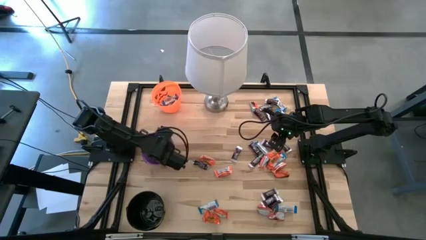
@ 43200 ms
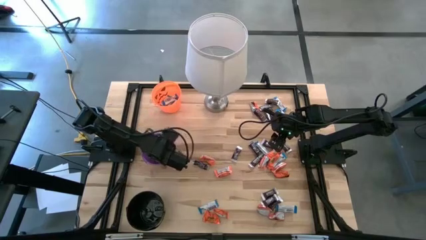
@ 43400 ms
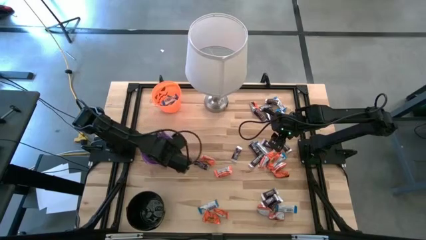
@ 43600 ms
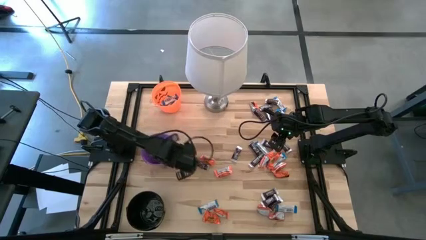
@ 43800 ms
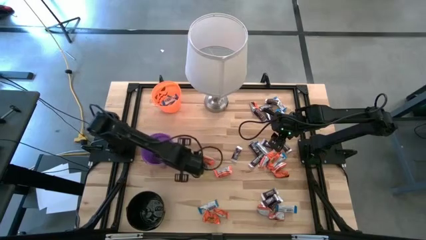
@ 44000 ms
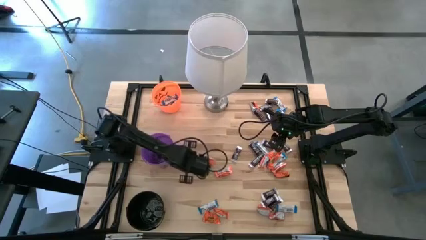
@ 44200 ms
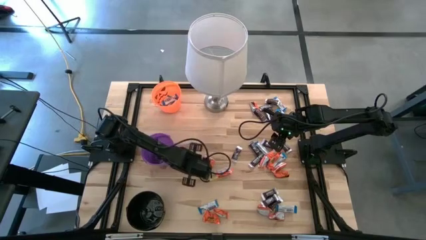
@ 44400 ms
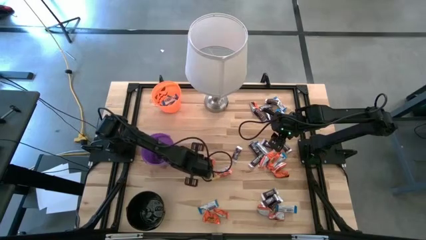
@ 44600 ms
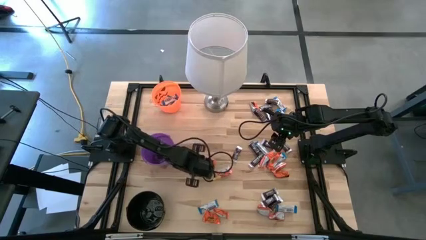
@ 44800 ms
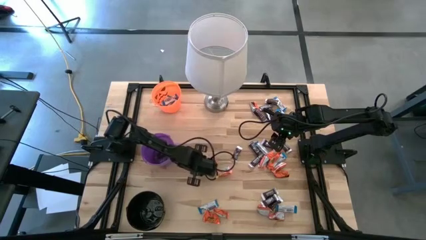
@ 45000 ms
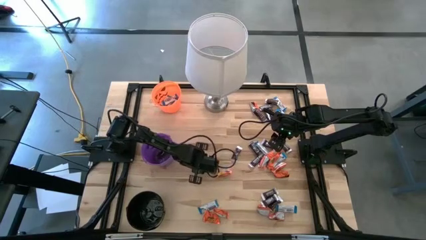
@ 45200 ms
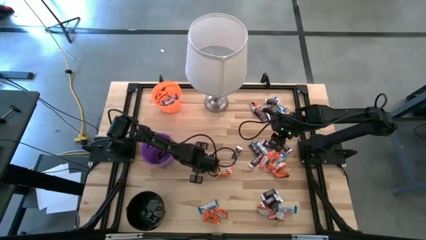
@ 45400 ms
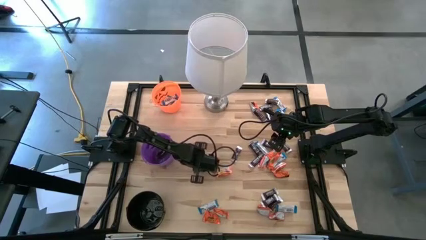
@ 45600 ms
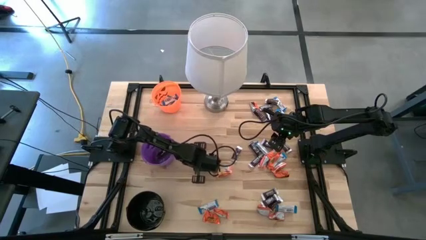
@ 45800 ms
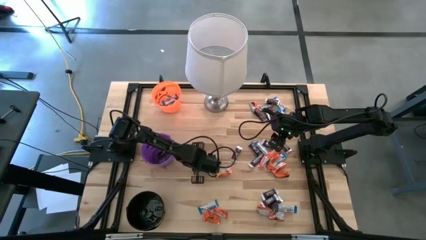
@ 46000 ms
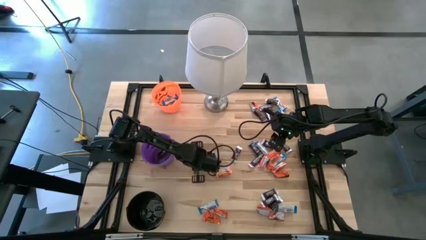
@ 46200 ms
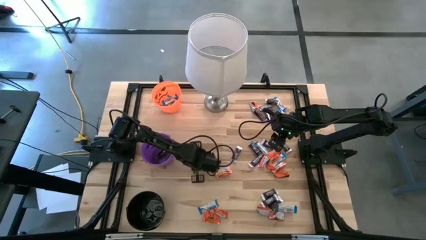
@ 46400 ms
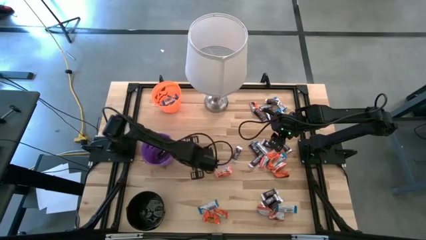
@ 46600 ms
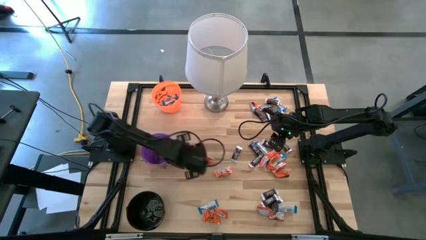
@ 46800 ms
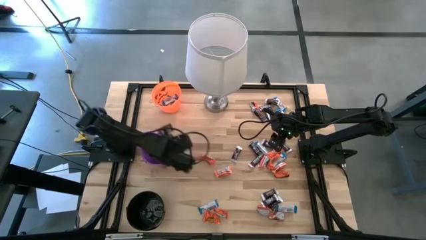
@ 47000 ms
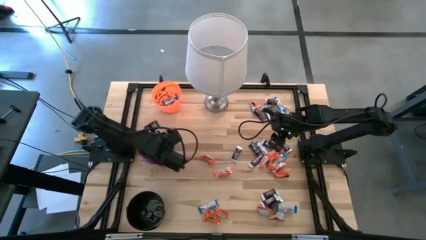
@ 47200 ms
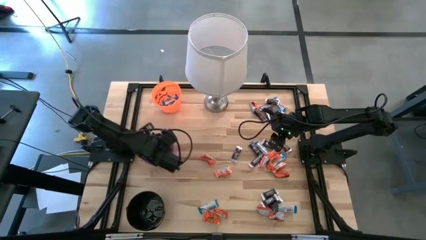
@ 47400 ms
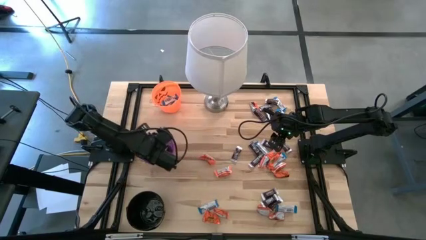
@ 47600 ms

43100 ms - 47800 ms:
Task: Sort candy
Put the brown chocolate into the purple bucket

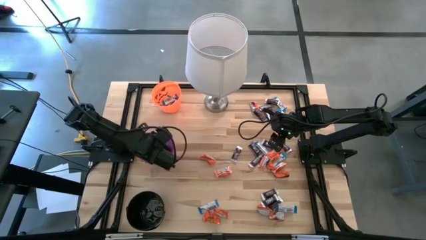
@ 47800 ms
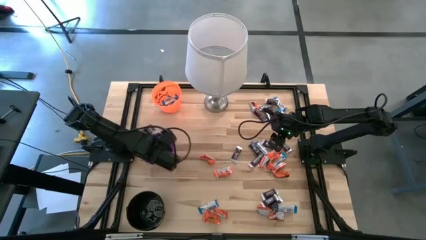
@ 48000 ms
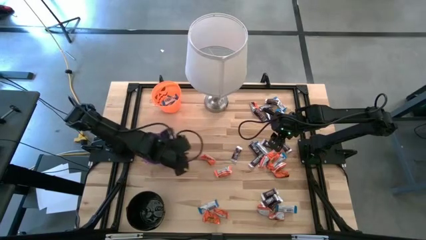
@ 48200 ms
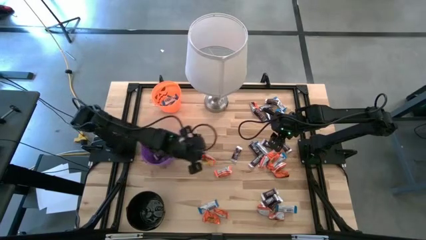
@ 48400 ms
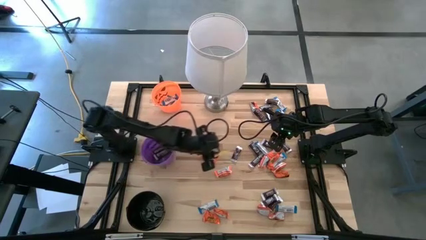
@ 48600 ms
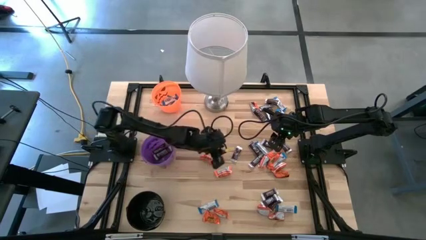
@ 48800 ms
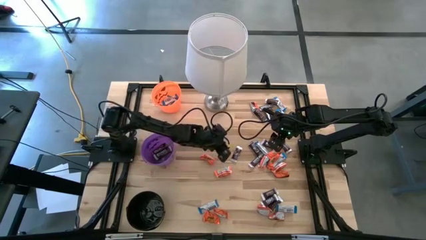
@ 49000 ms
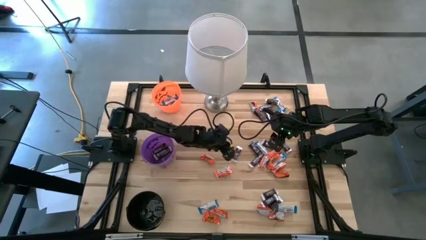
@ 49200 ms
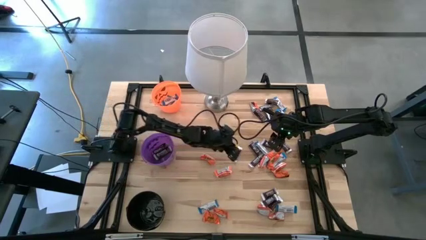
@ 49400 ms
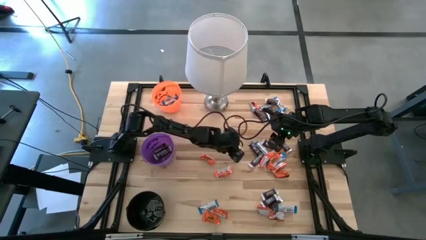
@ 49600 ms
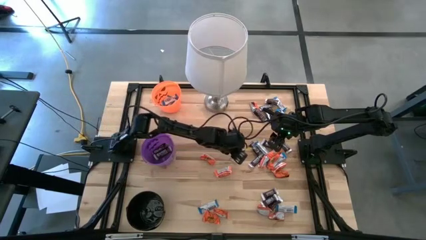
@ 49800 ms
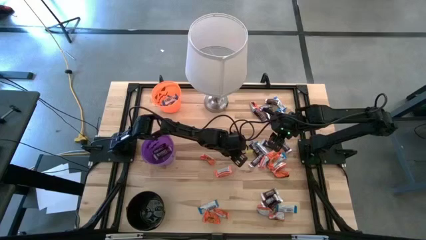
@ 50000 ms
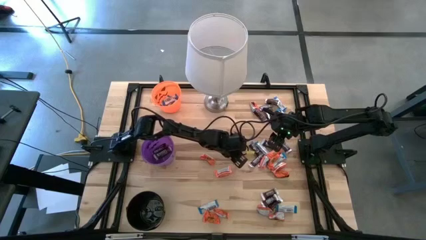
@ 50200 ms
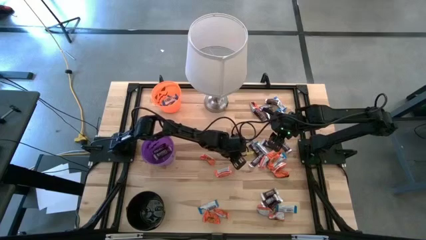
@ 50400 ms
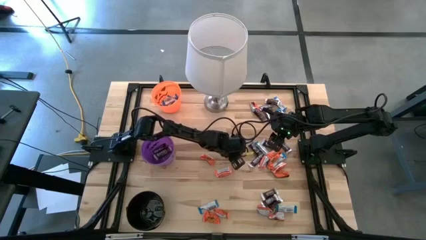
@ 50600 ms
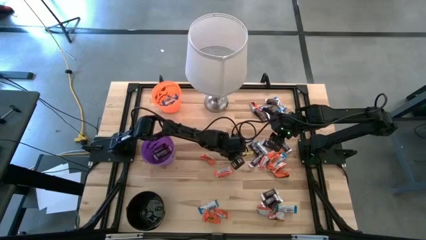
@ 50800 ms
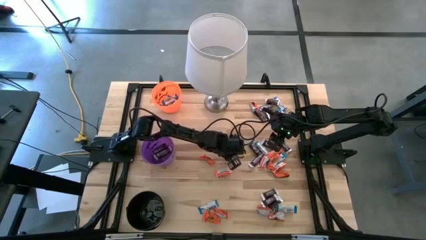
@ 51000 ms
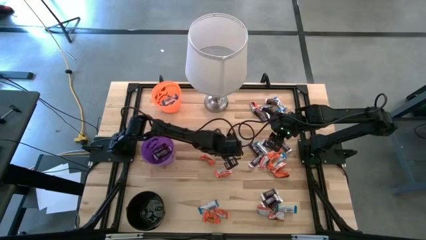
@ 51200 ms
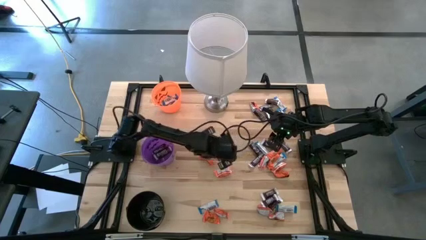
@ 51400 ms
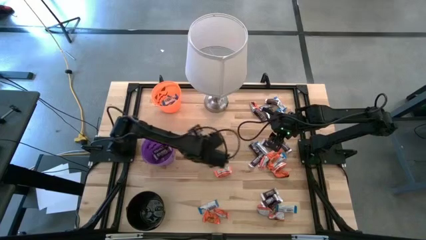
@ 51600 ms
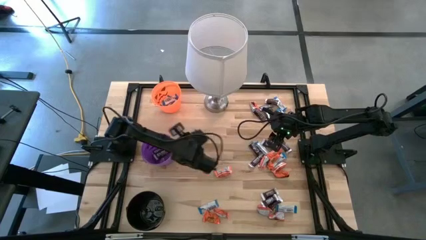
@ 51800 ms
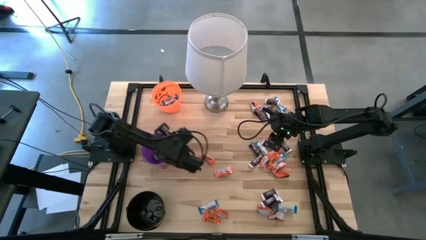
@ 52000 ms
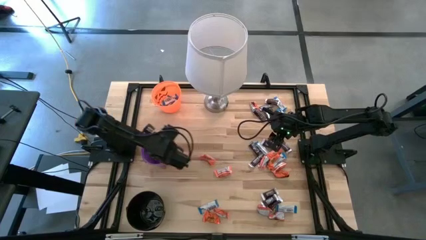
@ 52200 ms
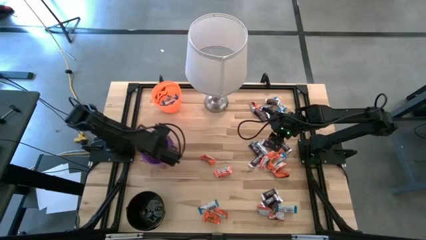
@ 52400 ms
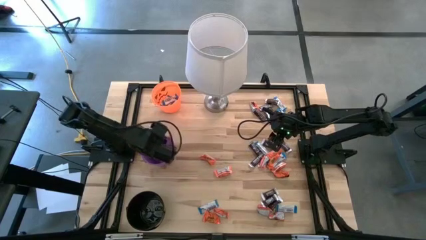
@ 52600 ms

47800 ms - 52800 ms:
Put the brown chocolate into the purple bucket

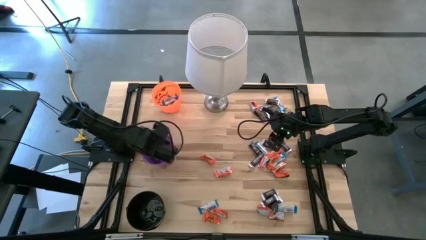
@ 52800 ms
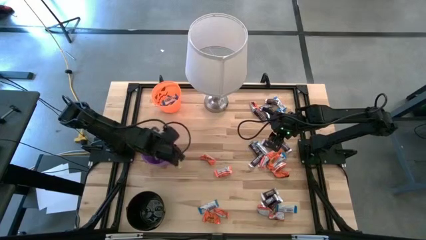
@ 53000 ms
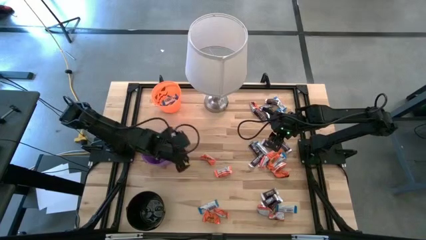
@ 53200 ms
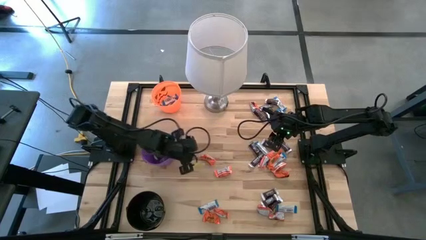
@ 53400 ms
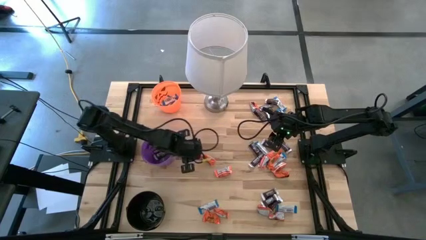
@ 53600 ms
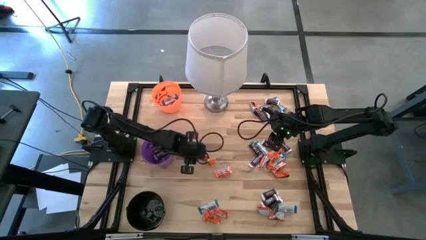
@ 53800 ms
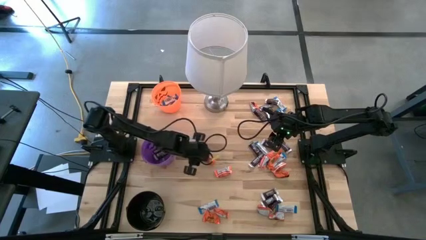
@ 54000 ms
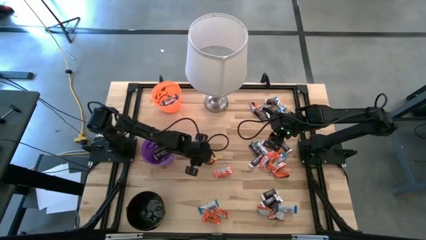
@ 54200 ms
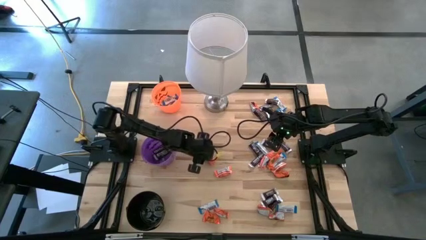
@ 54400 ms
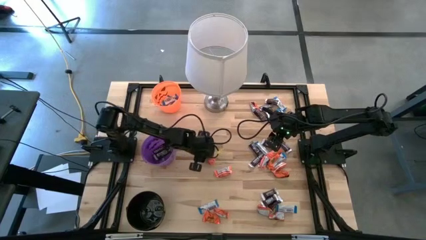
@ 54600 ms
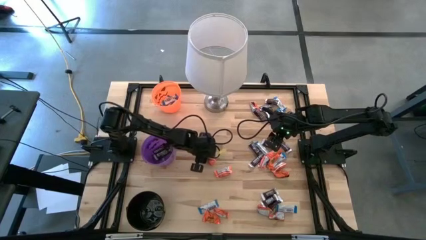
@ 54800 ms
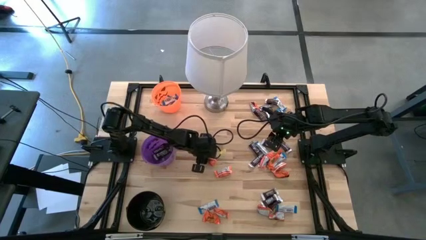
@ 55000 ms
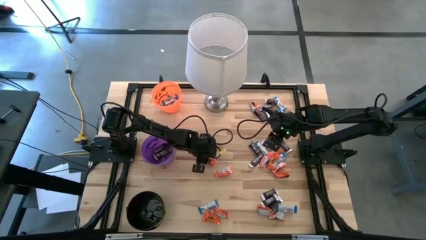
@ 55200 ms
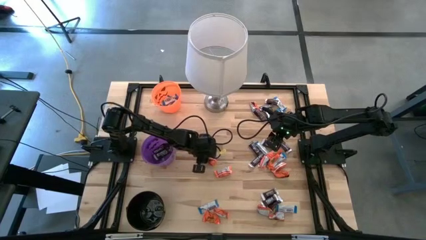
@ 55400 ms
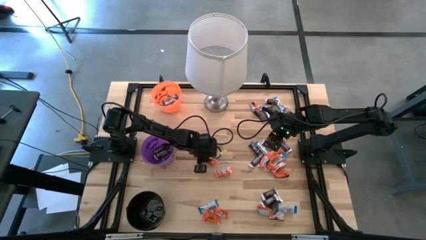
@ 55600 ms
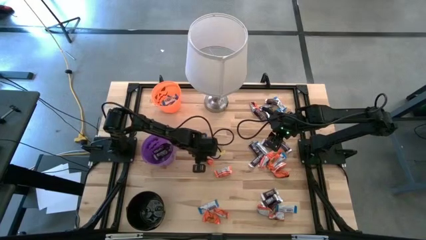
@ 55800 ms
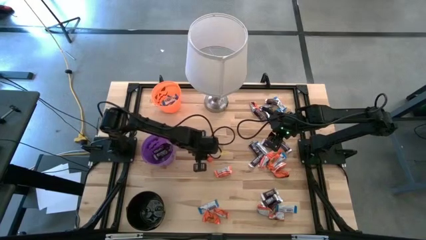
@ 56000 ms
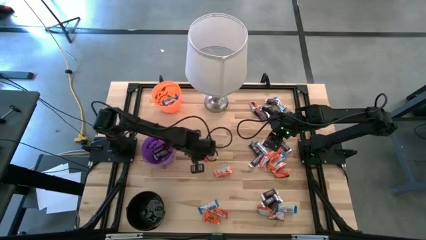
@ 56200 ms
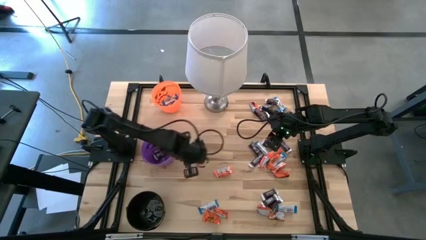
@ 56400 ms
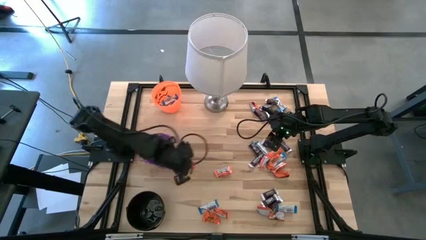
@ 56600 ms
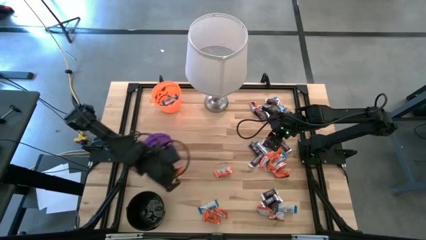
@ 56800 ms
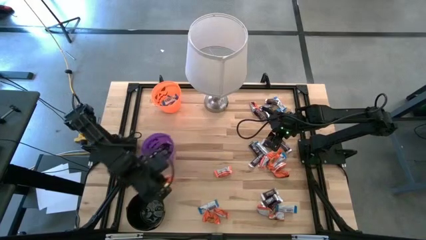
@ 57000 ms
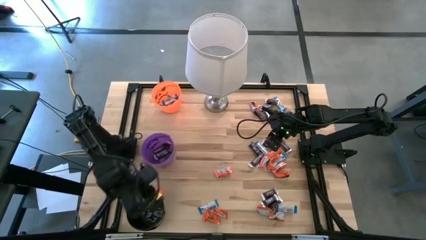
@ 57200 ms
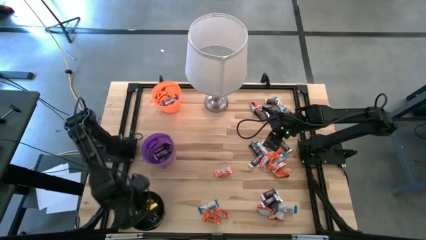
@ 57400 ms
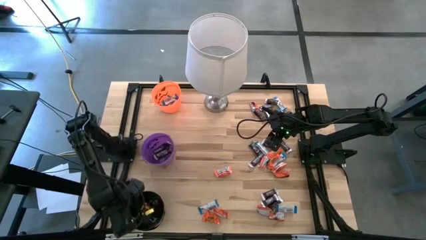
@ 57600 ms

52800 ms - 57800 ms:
Put the orange chocolate into the black bucket
